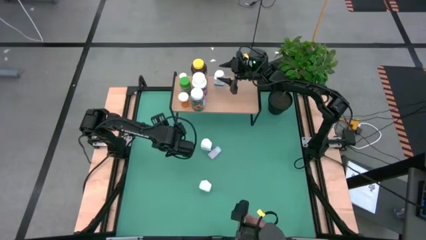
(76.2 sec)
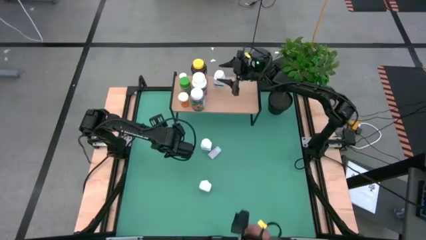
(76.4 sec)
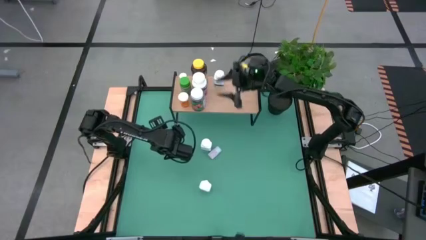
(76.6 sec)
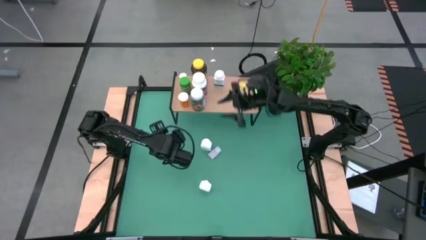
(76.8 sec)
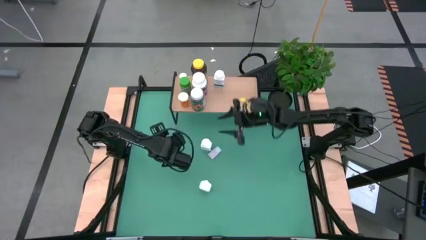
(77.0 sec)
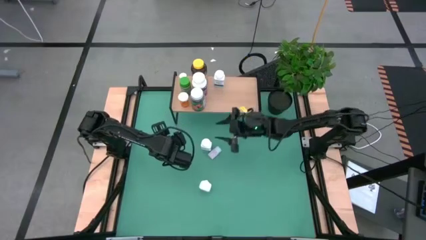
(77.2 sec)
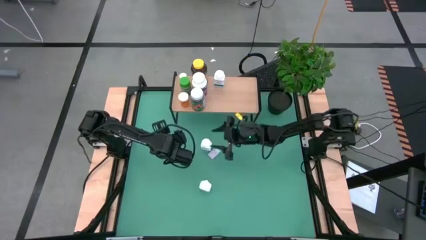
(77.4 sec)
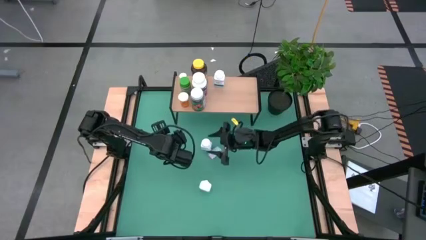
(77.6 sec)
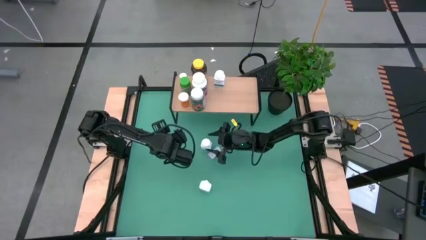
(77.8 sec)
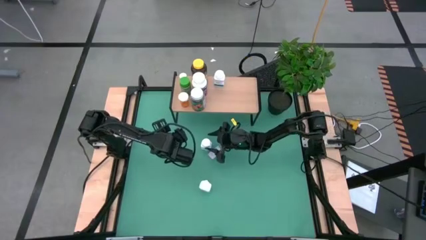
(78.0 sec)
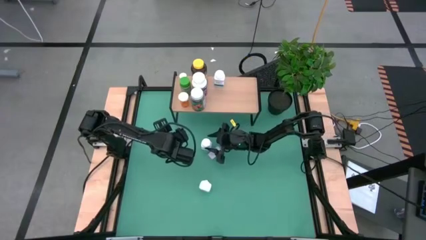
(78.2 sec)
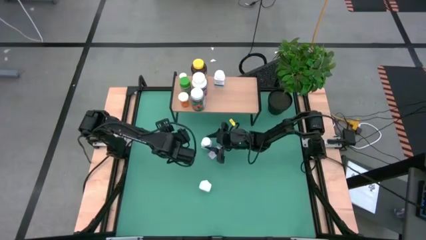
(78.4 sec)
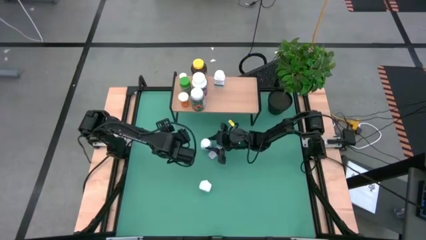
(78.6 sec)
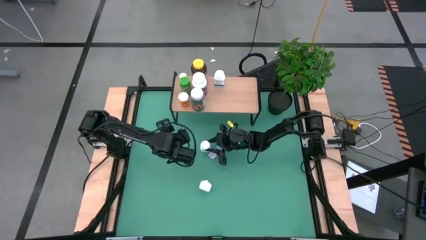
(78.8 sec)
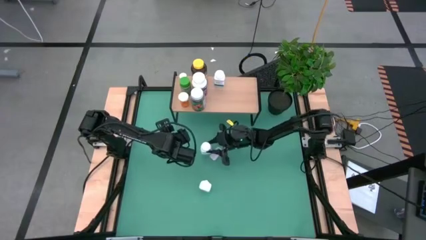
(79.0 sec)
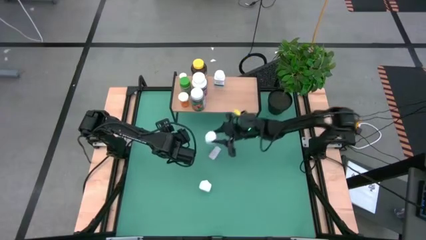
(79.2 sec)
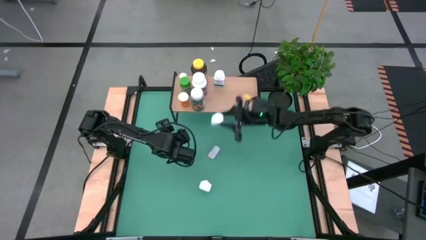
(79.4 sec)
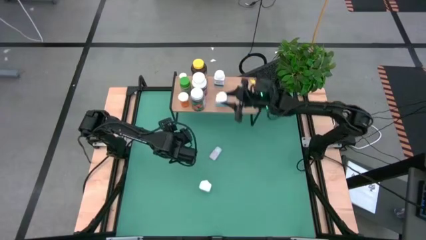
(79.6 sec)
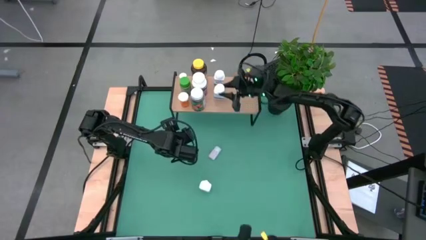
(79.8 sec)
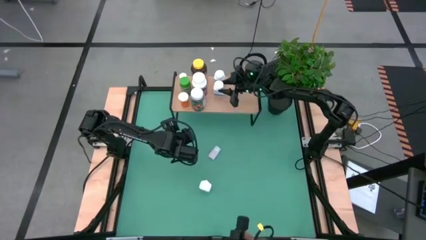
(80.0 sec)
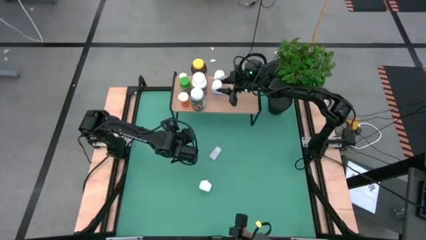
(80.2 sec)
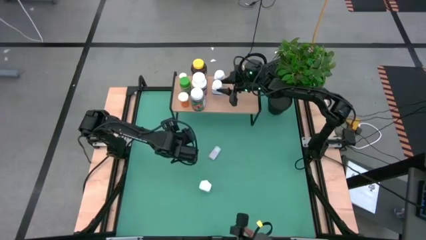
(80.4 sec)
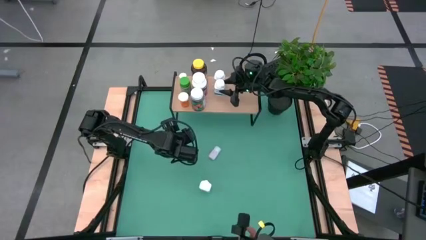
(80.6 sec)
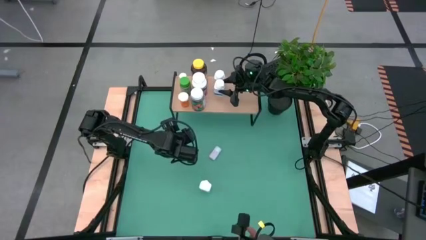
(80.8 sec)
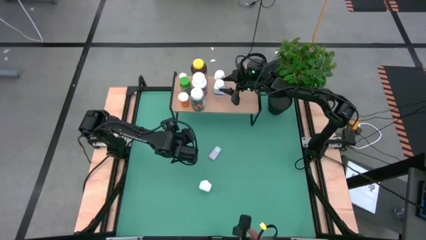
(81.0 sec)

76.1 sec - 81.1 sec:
Task: Pick and place medicine bottles onto shelf by color
Put the top white and blue bottle on the shelf aligned with the white and blue bottle

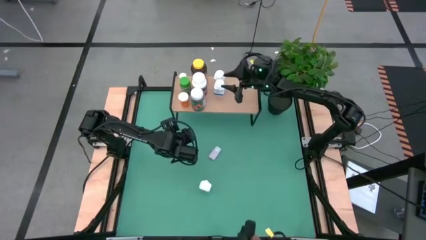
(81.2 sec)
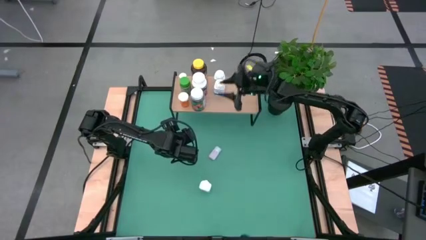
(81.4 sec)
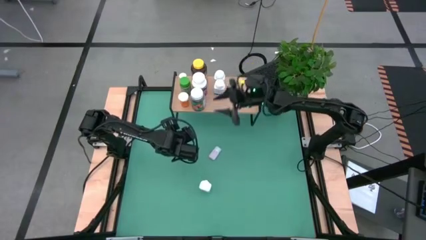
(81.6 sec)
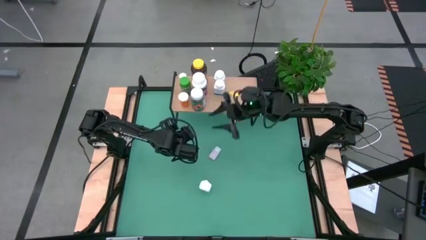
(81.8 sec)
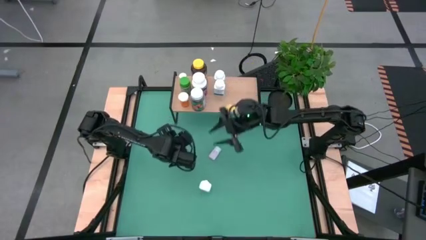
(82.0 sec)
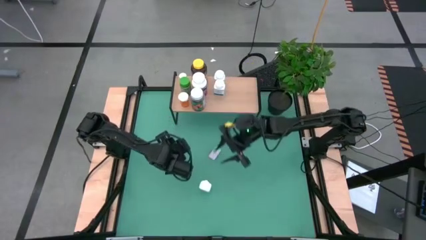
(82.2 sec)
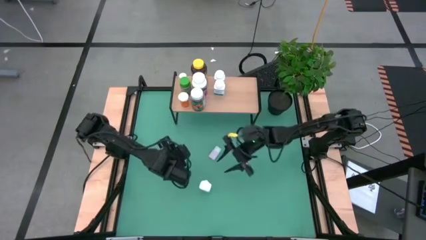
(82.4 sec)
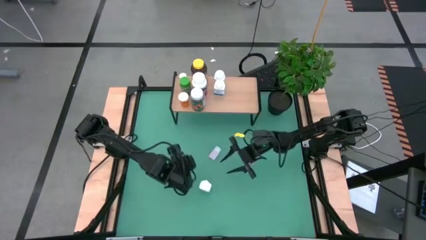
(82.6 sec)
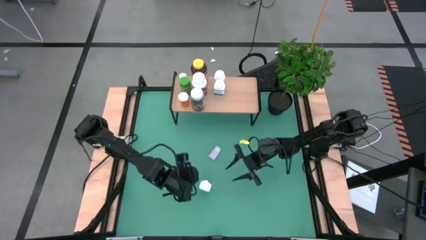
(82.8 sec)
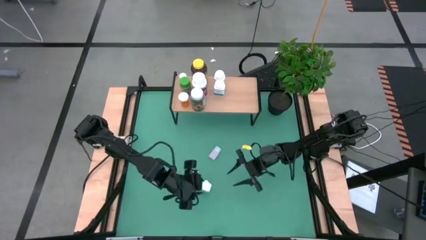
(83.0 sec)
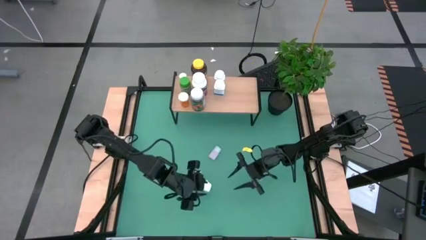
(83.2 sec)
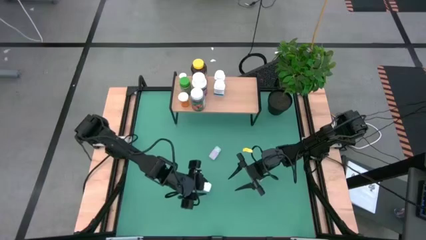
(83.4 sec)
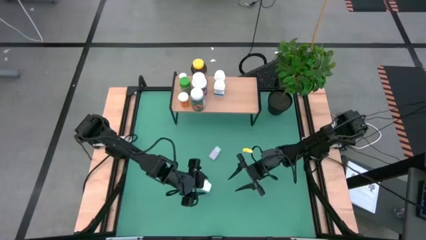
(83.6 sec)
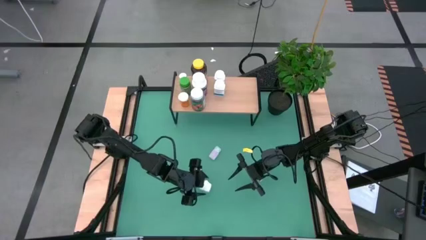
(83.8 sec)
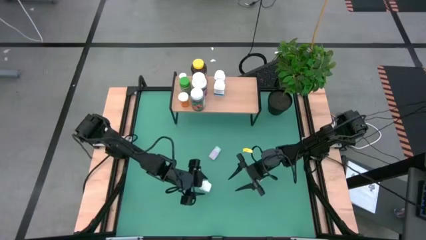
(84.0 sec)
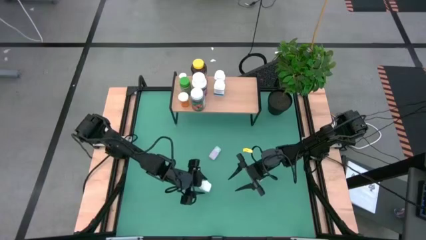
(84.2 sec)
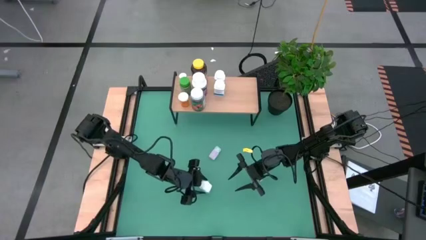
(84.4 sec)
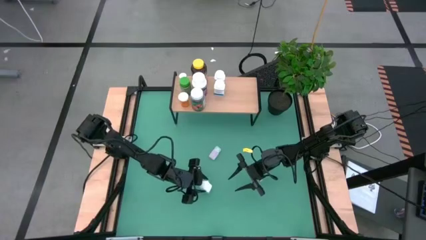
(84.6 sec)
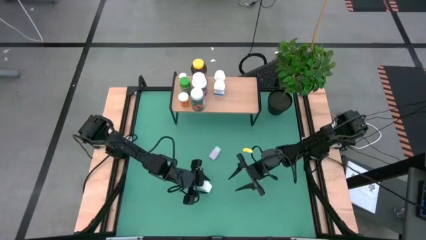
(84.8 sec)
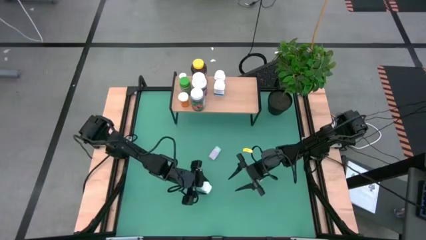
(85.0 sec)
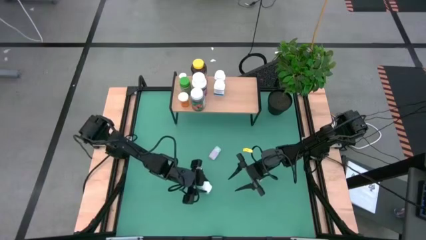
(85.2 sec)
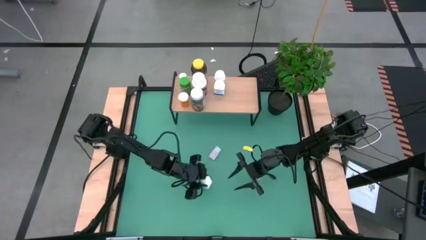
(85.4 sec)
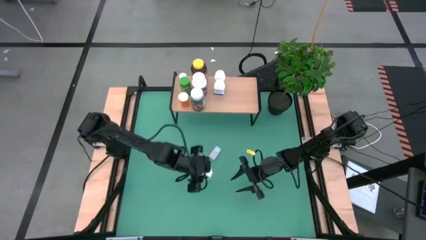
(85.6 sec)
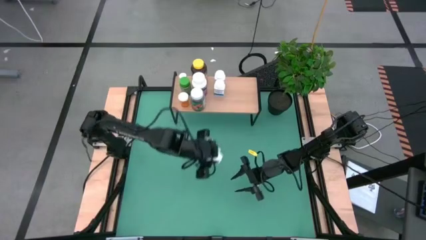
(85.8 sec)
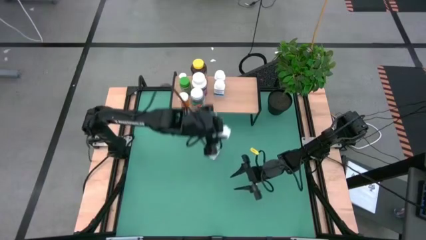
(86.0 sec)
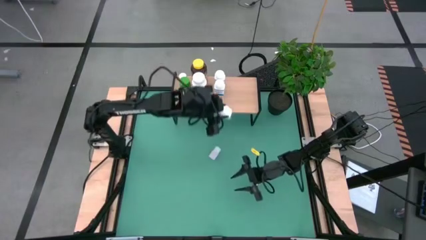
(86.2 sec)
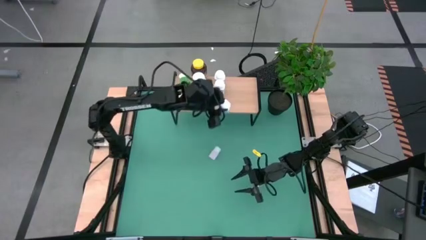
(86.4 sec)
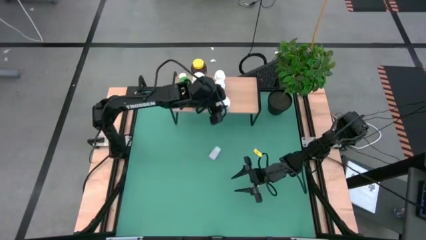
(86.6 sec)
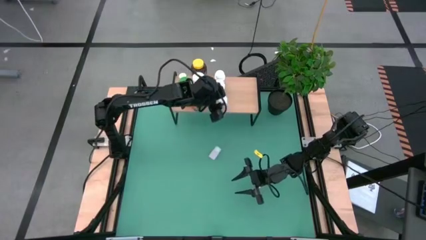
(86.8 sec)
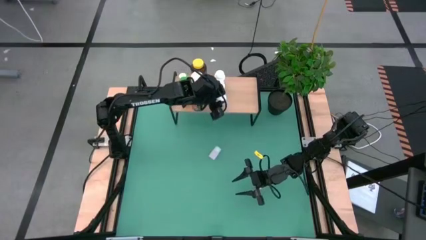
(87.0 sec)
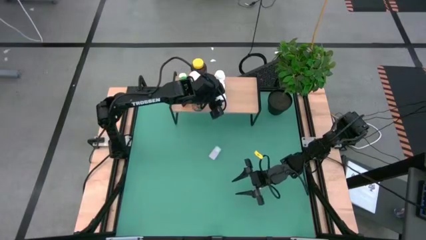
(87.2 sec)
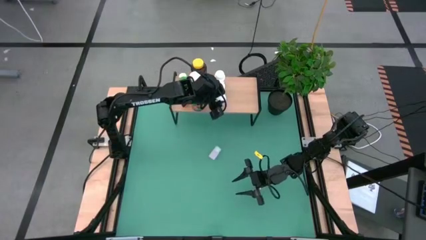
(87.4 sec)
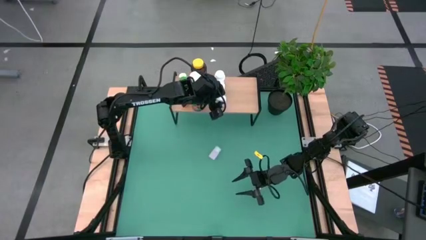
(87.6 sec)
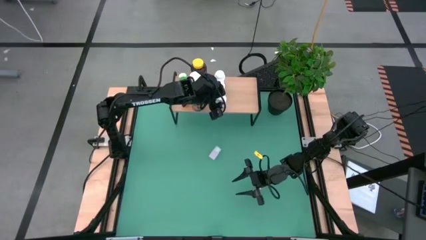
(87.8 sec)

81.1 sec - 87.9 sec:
Put the white and blue bottle on the shelf aligned with the white and blue bottles

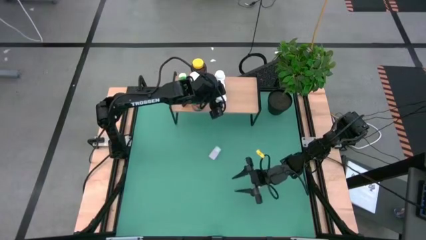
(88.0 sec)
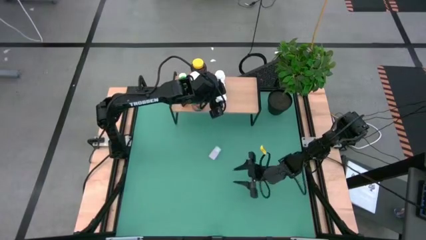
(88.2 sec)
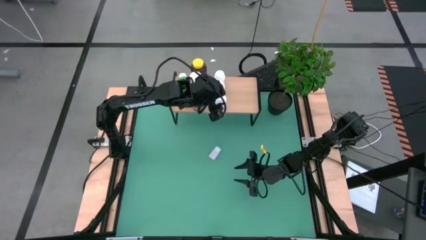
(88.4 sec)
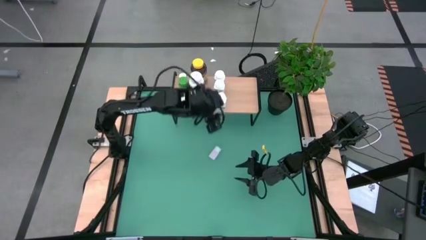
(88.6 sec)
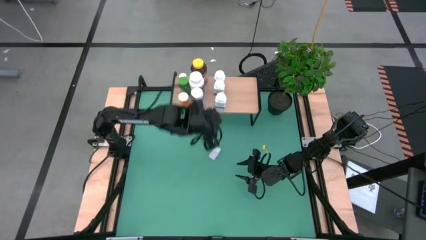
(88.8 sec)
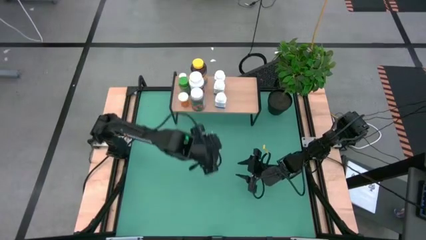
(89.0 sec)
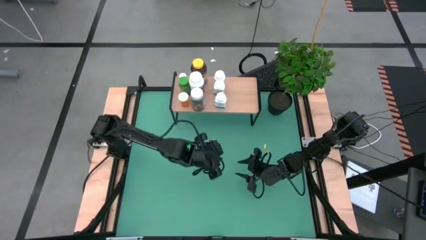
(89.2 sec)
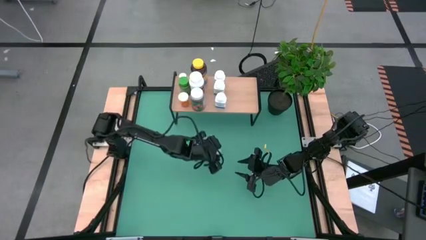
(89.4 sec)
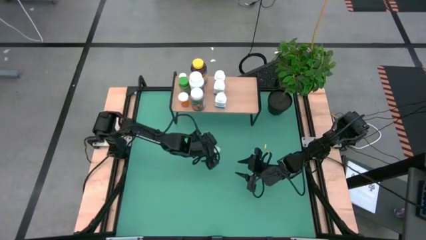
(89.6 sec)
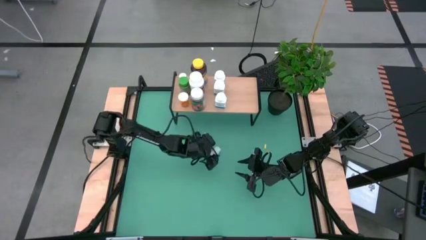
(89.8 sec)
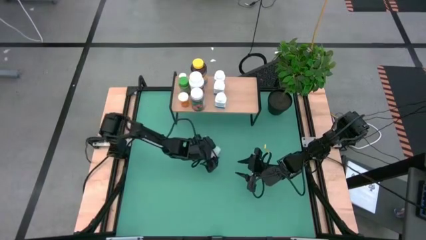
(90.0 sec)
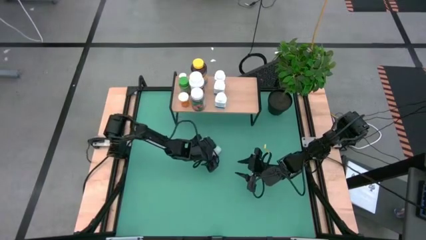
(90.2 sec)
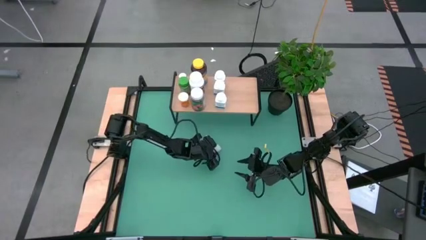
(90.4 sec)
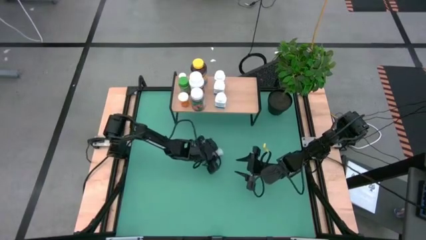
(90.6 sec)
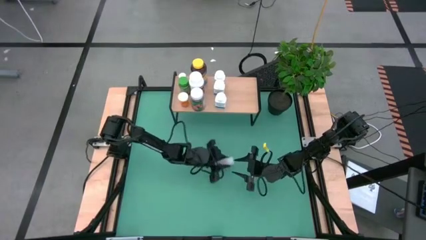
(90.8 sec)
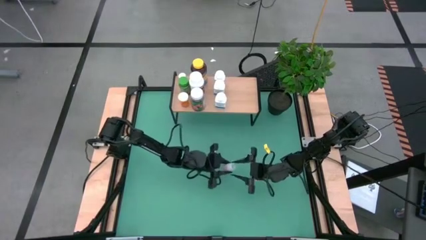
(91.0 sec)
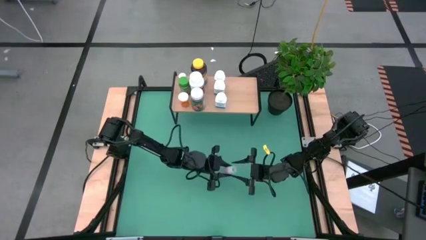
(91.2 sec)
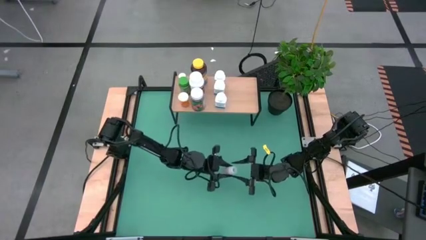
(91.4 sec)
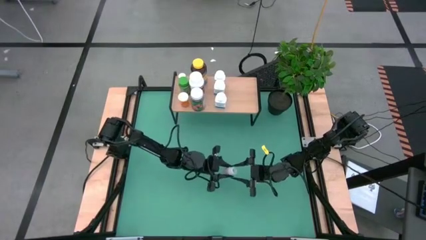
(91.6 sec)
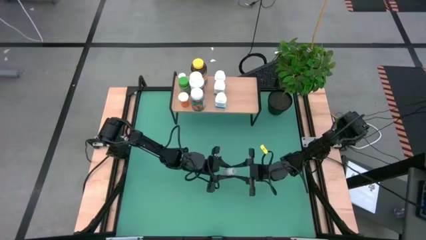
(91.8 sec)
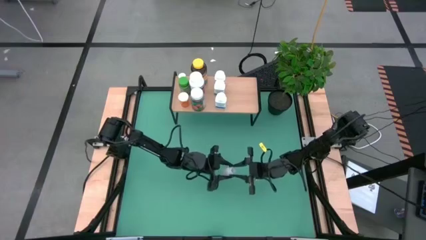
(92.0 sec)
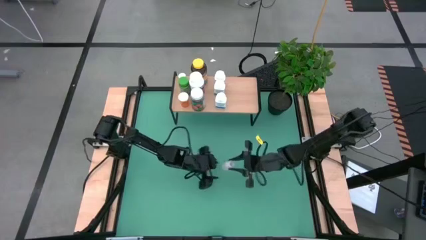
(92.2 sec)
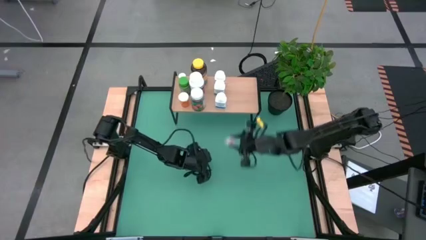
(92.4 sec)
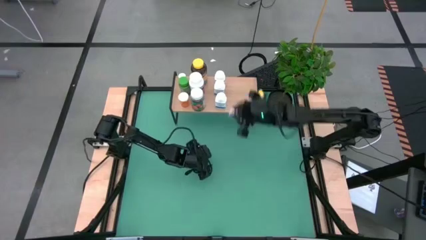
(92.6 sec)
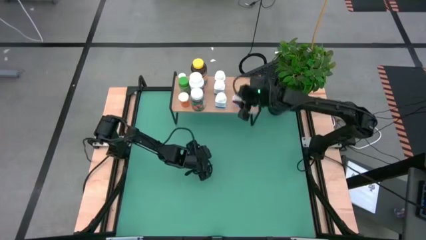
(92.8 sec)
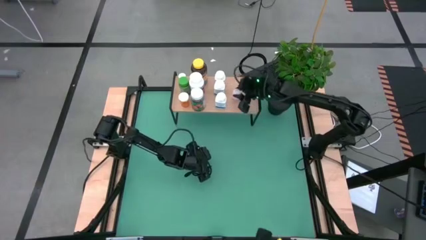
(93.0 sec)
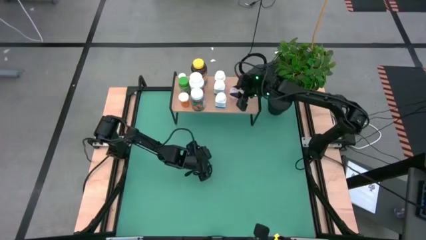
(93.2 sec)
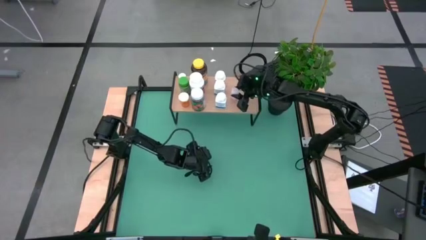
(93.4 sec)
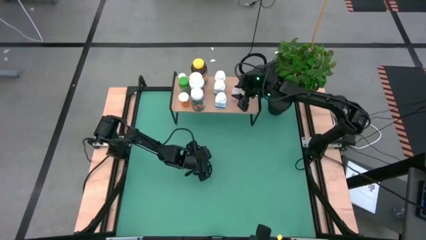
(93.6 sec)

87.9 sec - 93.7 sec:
Put the white bottle on the shelf
